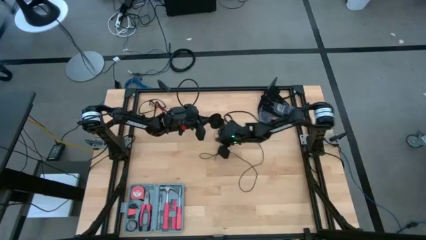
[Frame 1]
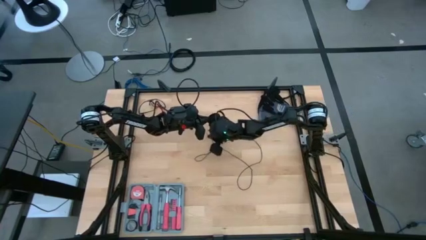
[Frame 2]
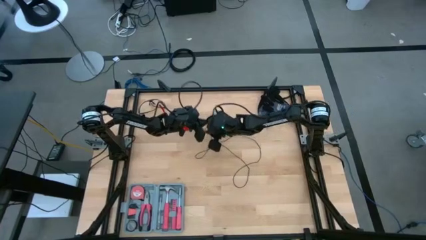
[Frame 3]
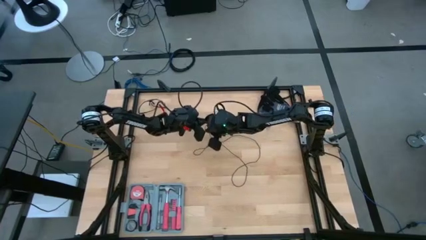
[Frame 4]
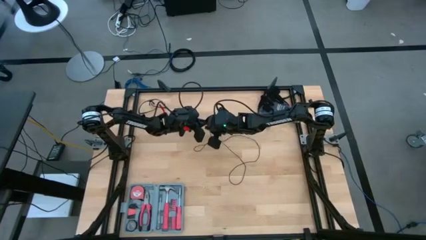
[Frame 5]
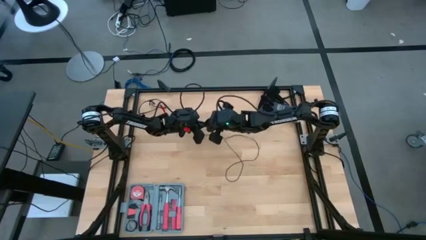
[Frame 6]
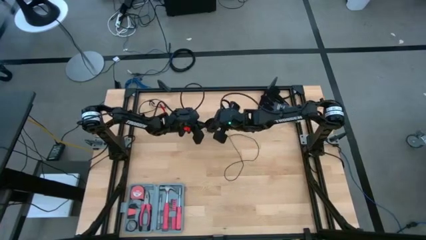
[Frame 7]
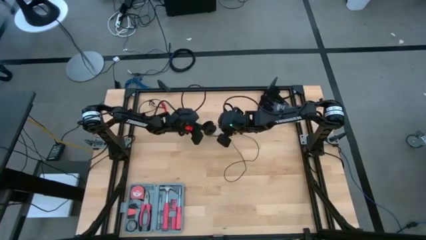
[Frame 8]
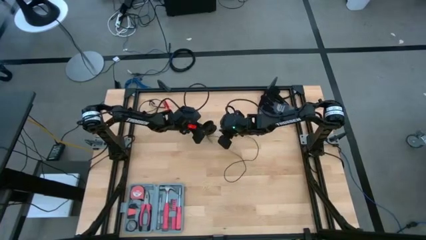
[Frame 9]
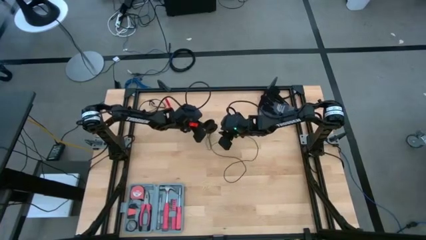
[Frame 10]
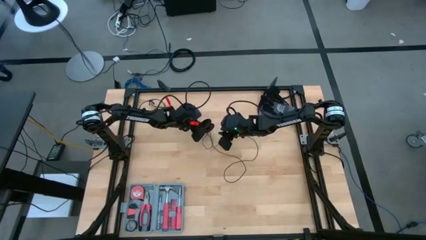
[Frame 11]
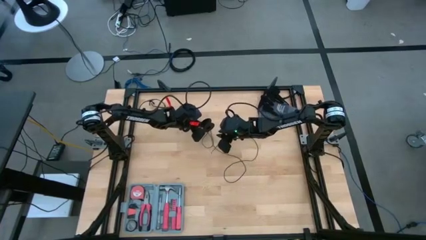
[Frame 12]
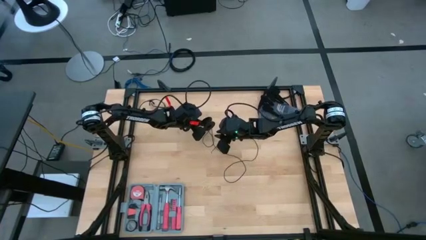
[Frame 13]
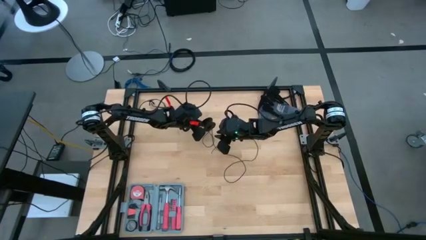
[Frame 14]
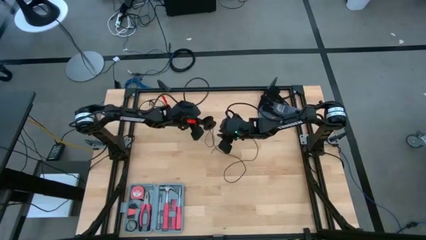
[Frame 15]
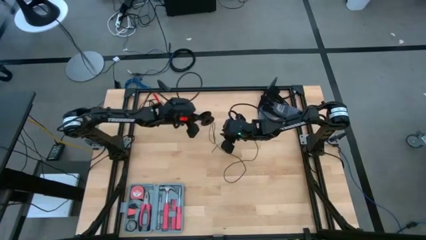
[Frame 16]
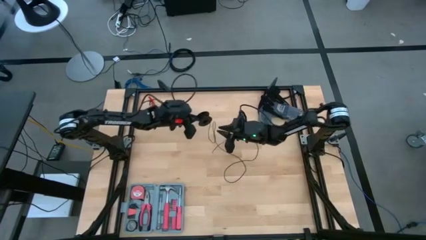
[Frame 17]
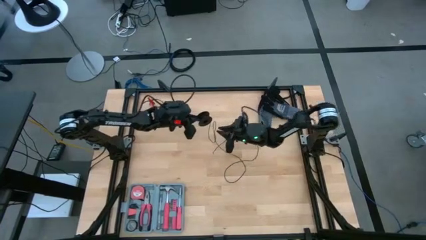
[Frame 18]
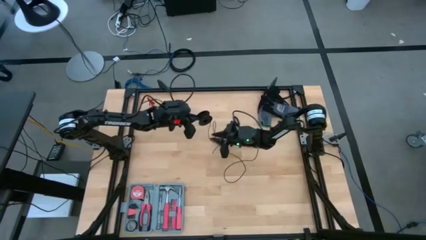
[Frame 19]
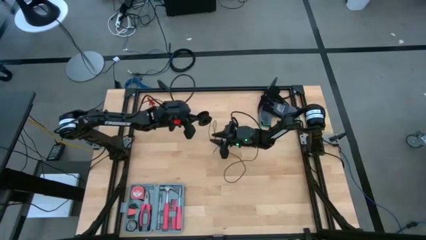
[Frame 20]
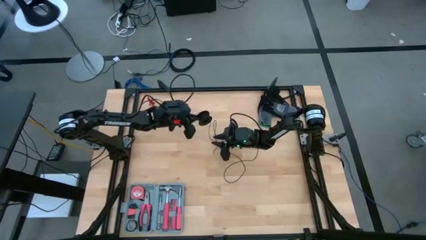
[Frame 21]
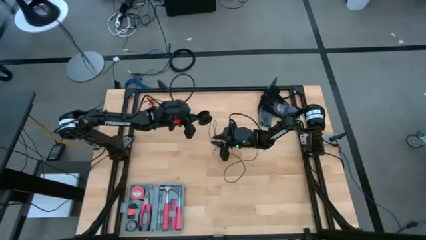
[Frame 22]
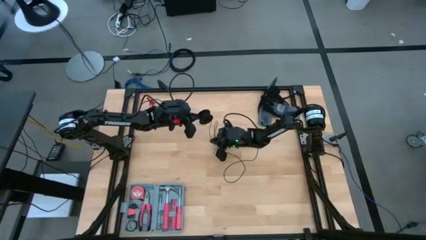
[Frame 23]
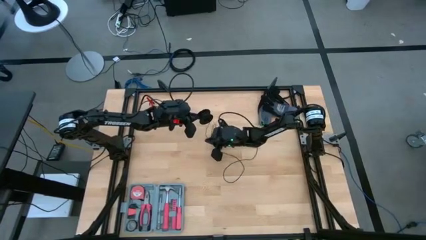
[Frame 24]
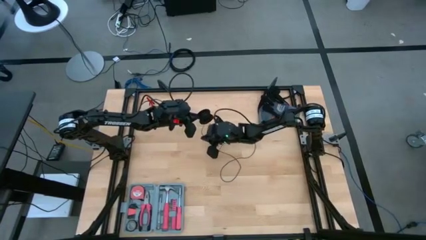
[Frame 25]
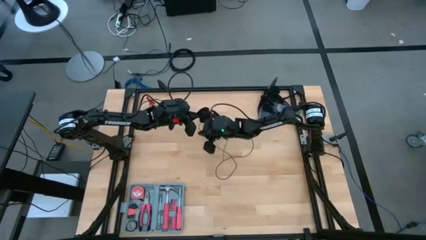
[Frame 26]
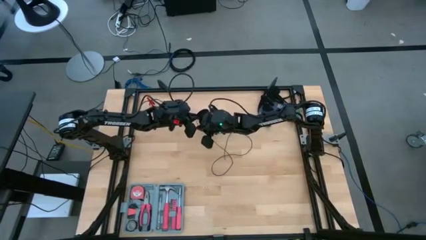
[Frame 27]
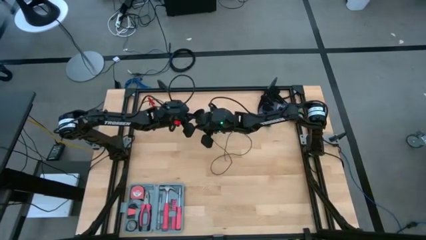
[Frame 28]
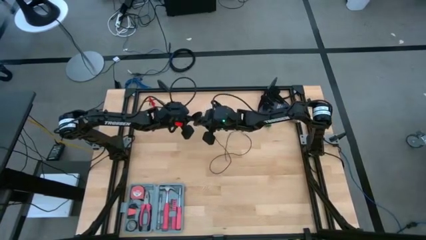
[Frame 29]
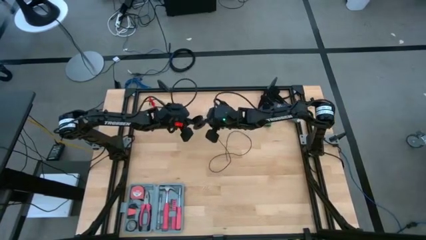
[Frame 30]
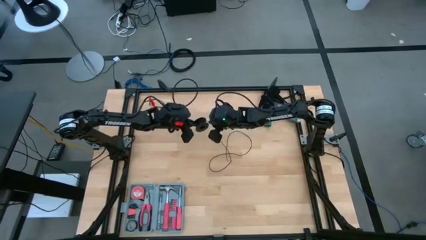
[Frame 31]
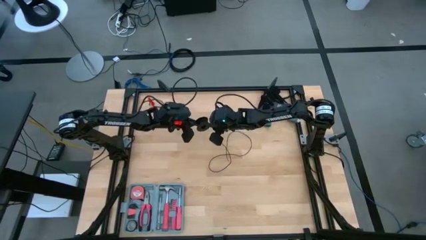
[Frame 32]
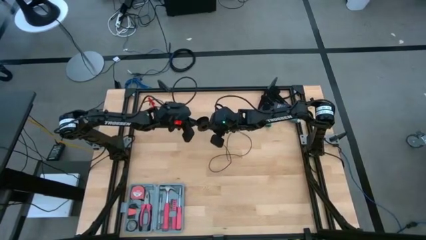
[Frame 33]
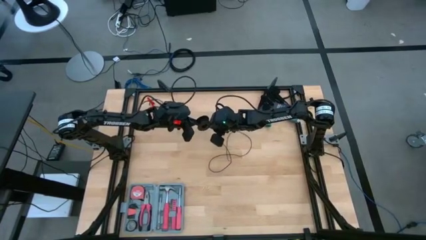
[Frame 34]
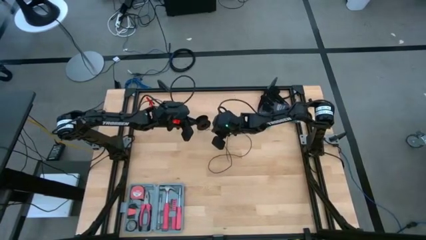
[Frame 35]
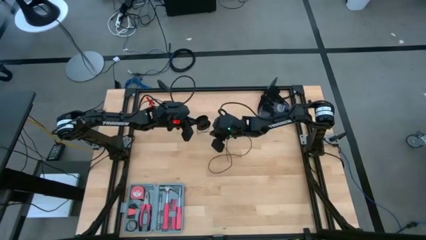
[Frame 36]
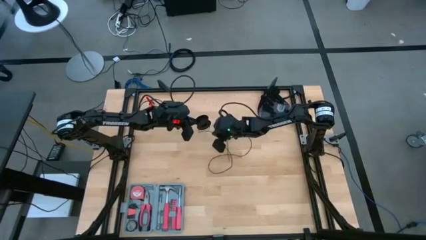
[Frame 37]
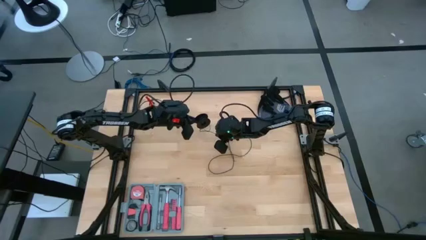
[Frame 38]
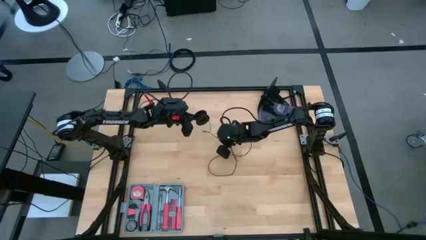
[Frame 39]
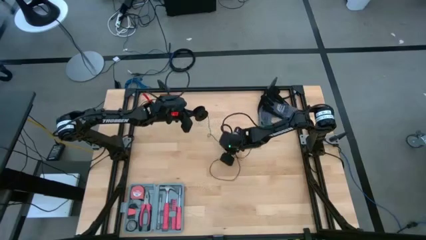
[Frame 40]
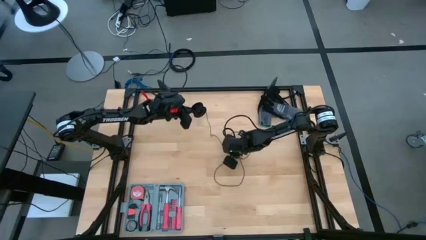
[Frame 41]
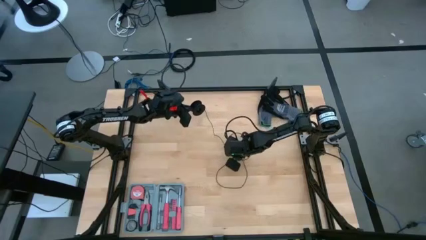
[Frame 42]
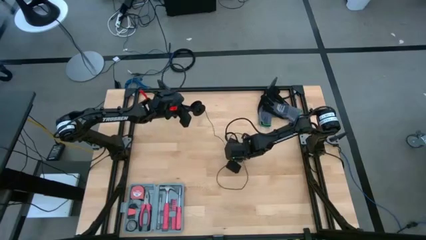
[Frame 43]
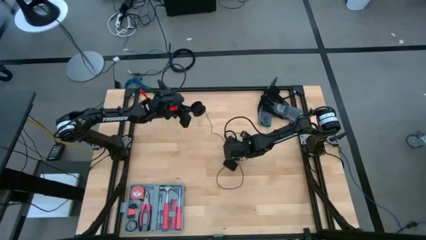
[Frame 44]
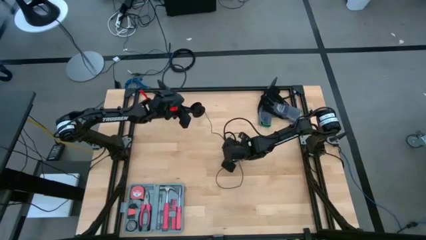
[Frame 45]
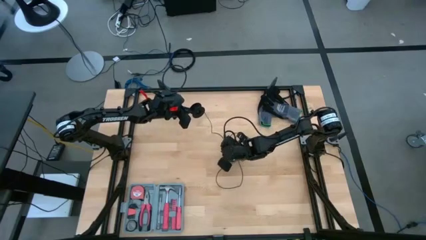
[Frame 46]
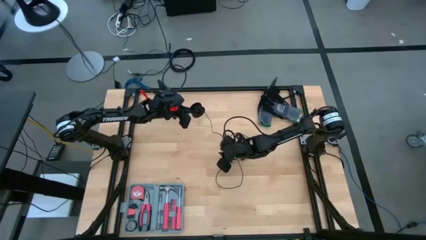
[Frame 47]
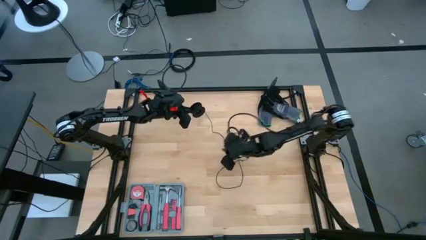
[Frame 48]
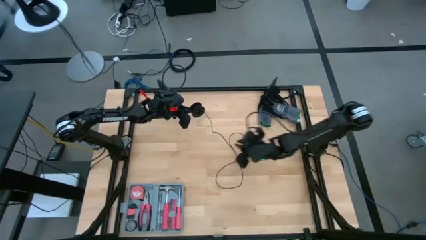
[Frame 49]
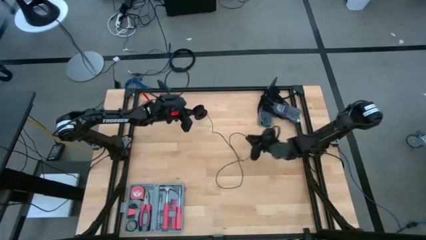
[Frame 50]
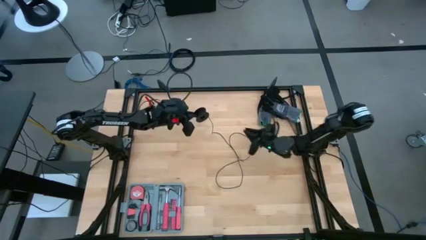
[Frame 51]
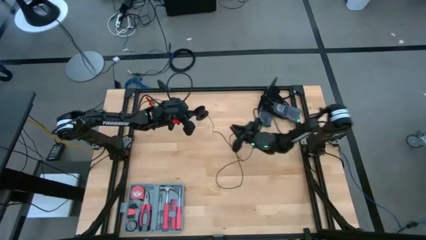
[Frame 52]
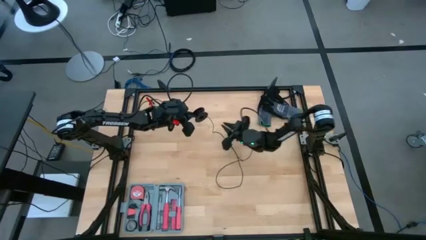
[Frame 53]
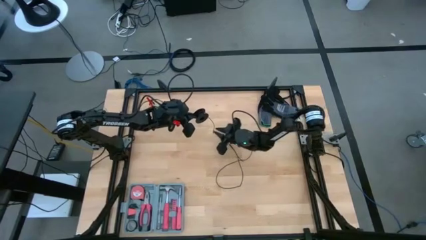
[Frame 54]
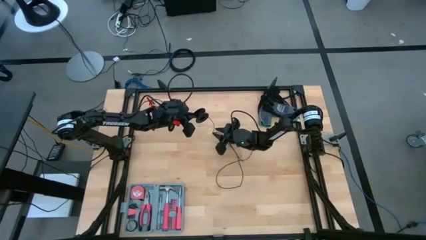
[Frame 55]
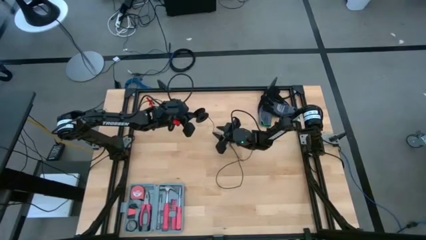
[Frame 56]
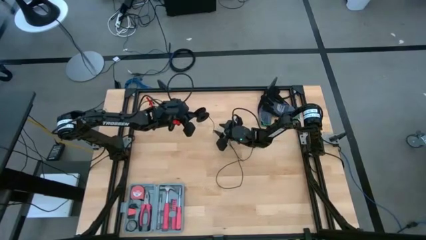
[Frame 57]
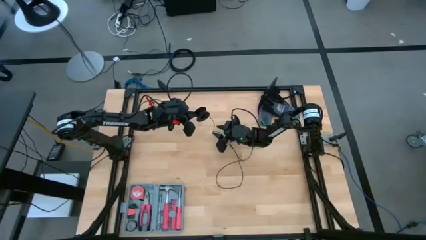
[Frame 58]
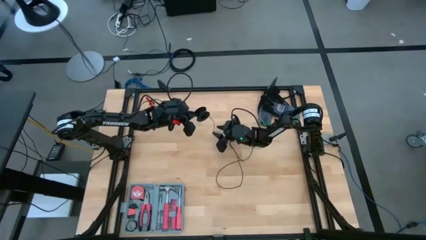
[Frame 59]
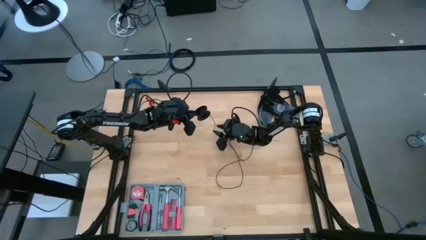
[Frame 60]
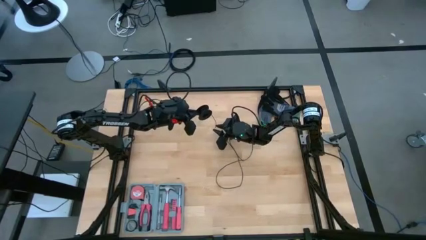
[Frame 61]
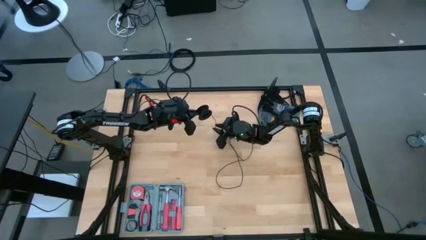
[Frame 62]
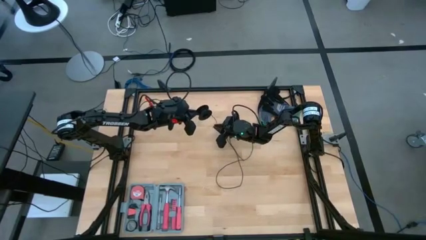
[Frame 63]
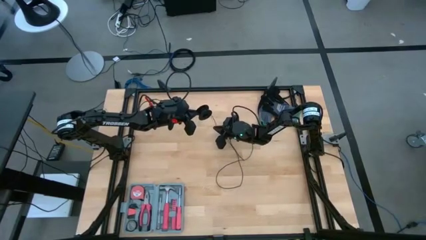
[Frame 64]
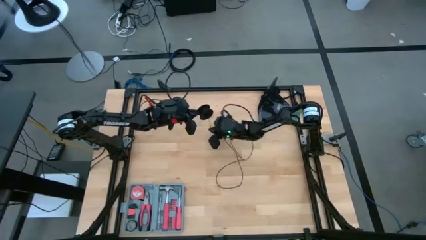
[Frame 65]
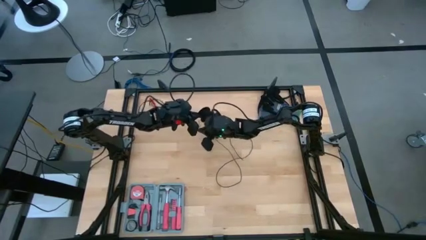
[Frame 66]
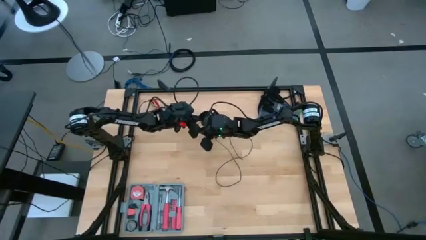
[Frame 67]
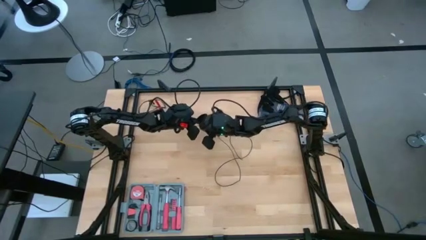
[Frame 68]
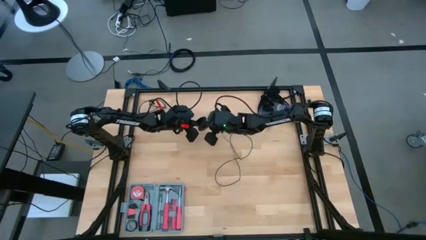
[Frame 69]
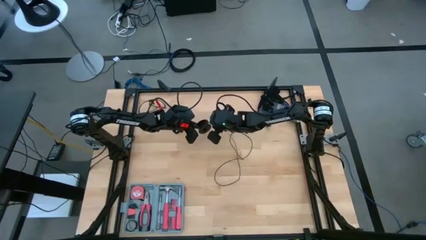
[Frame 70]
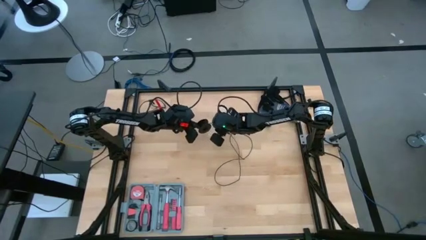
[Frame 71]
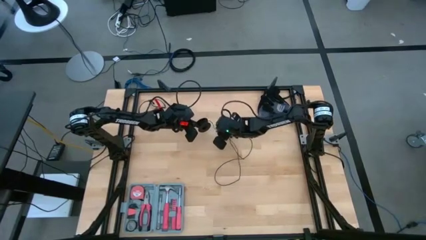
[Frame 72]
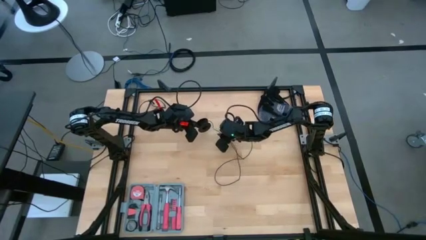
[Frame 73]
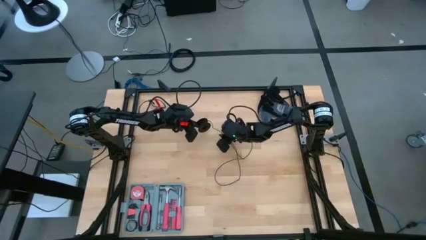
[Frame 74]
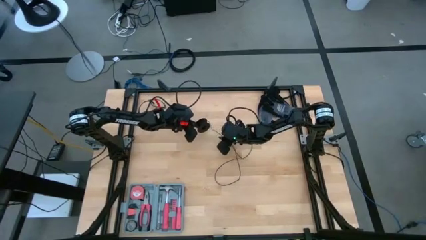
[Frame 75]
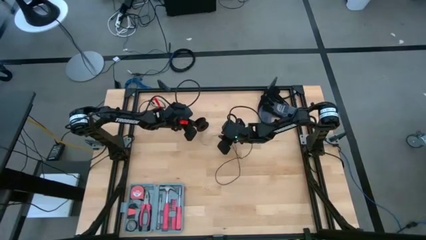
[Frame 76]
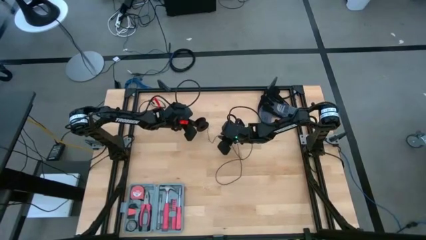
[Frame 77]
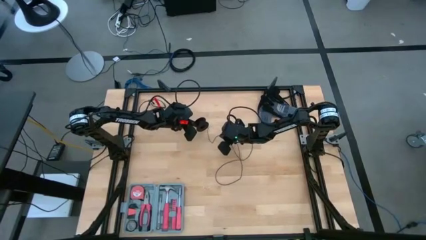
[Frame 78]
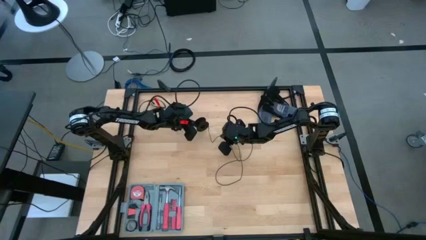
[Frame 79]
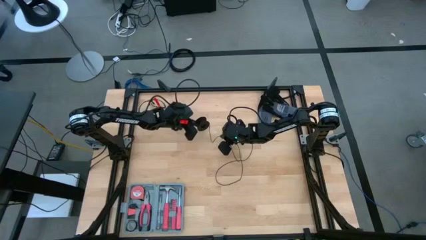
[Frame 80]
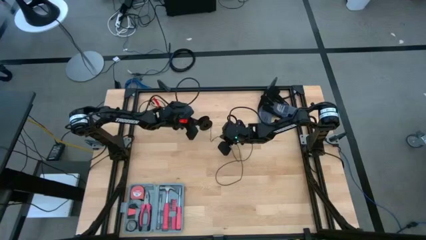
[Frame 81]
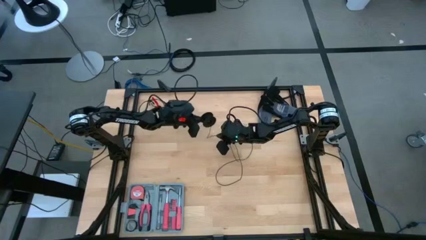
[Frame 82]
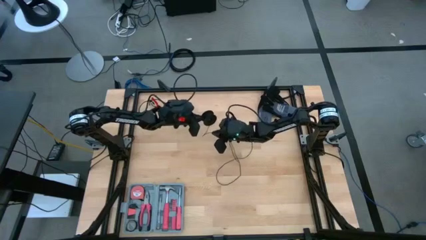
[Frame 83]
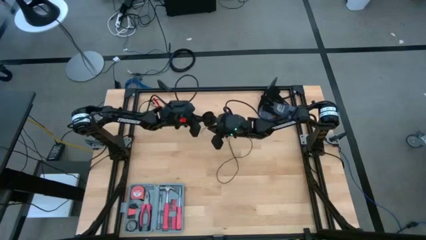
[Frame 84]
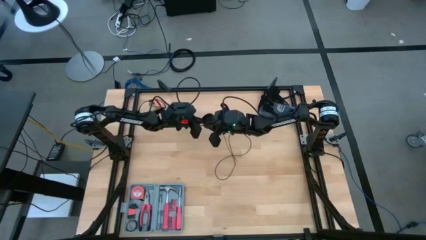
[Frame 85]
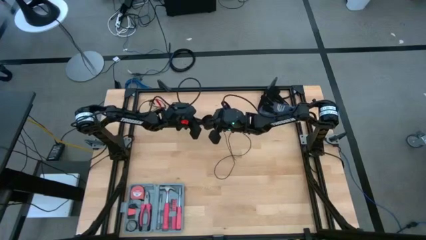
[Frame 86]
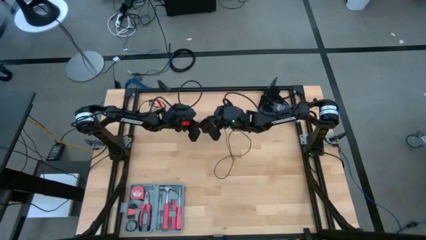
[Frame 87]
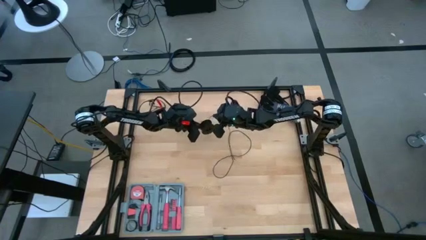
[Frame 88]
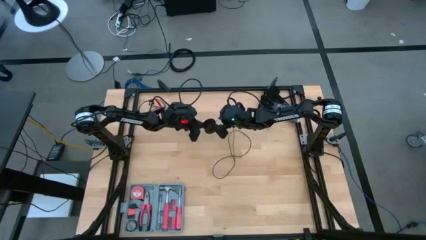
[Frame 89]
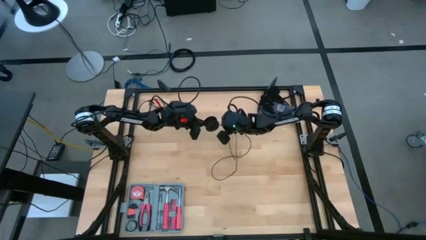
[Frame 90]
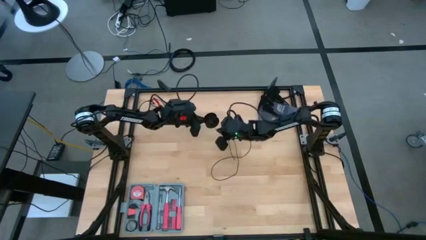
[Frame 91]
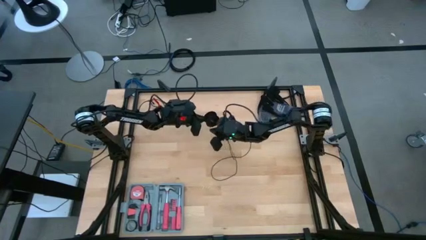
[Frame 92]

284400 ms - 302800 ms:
Task: Coil cords
Coil the black wire onto the black spool
